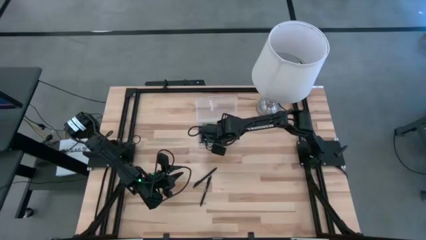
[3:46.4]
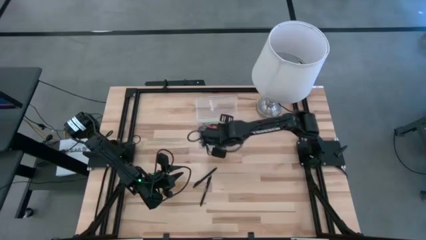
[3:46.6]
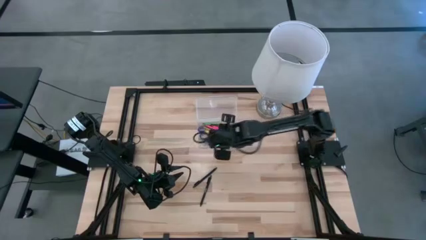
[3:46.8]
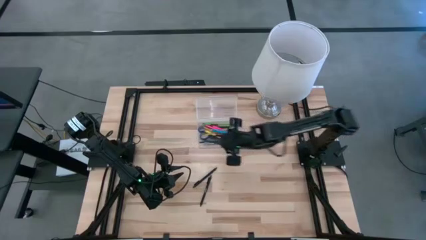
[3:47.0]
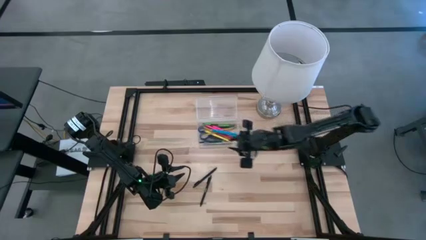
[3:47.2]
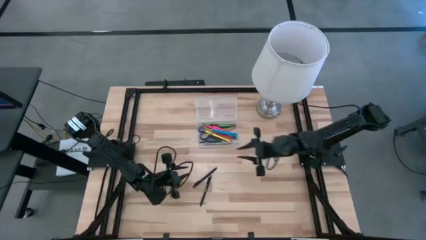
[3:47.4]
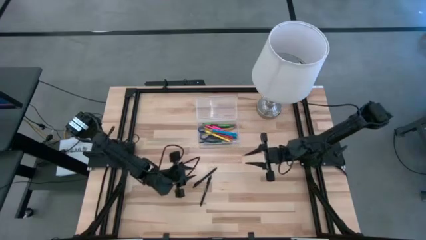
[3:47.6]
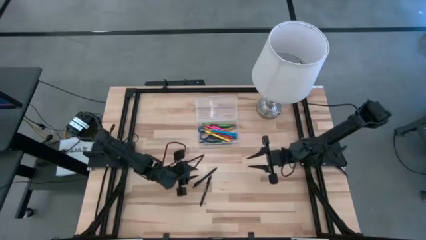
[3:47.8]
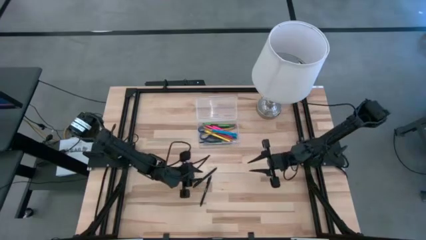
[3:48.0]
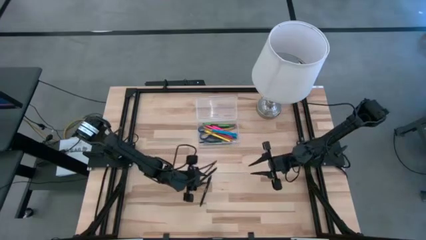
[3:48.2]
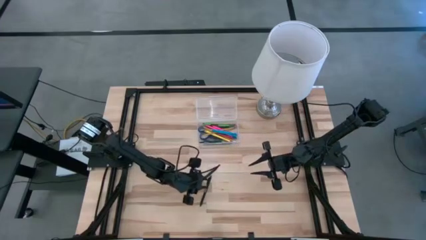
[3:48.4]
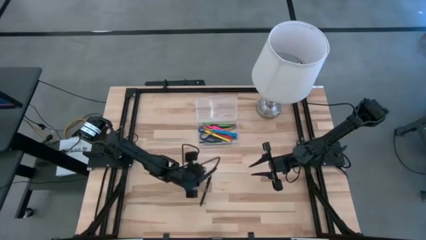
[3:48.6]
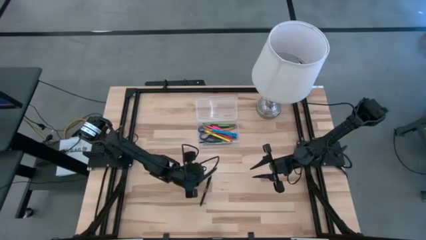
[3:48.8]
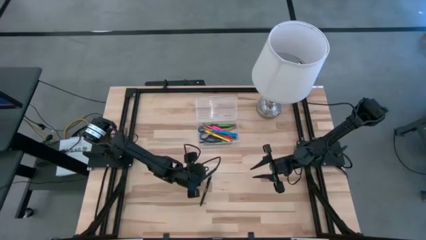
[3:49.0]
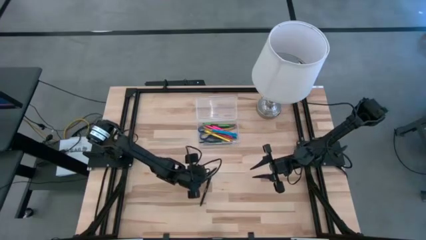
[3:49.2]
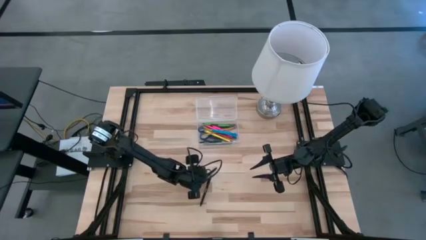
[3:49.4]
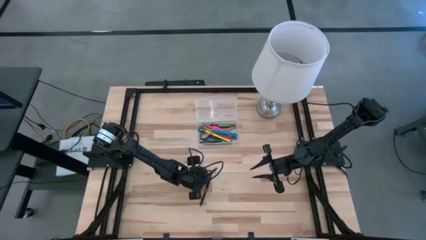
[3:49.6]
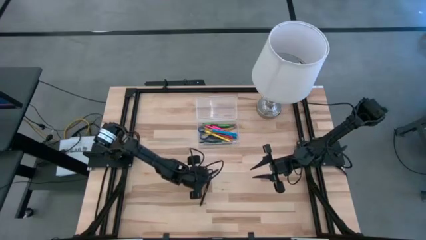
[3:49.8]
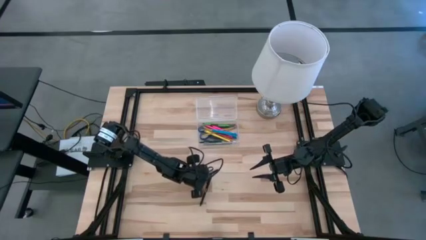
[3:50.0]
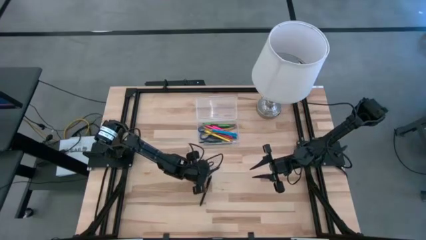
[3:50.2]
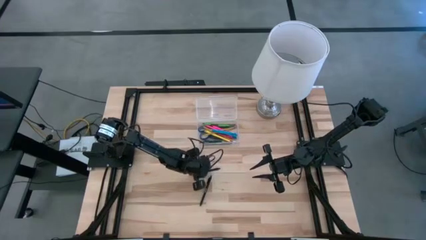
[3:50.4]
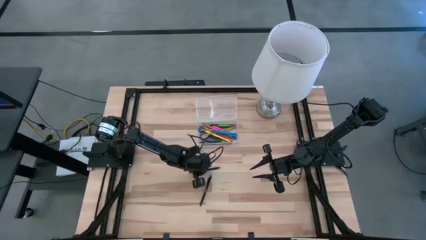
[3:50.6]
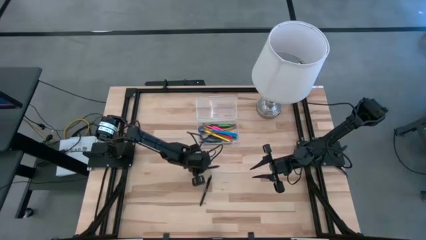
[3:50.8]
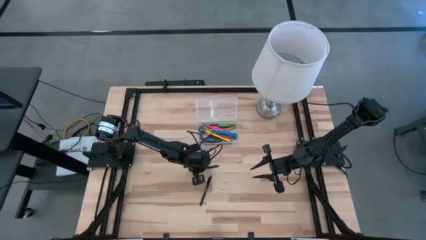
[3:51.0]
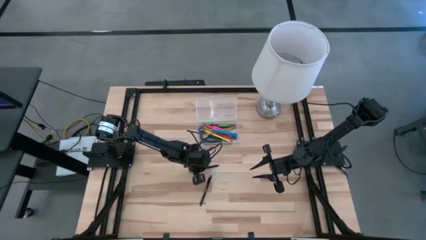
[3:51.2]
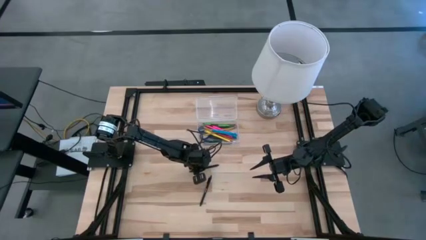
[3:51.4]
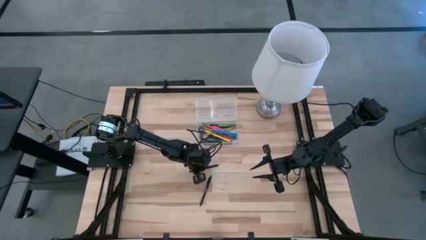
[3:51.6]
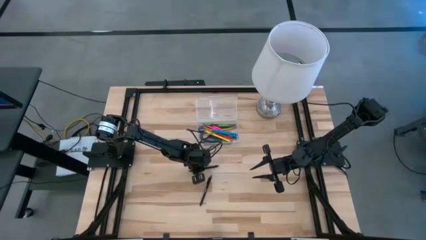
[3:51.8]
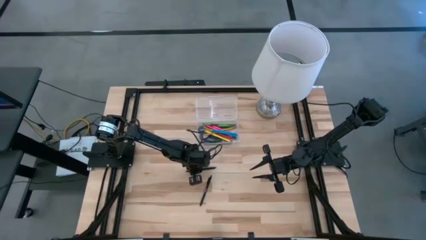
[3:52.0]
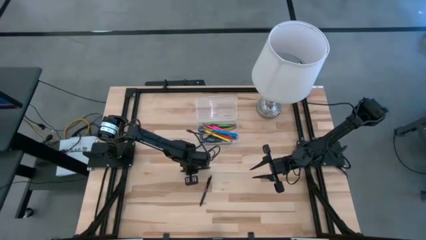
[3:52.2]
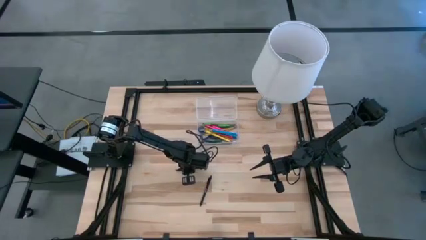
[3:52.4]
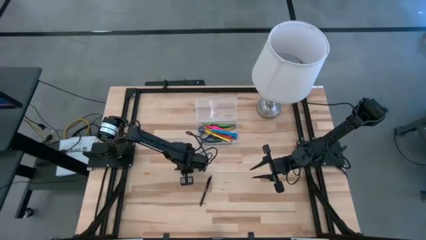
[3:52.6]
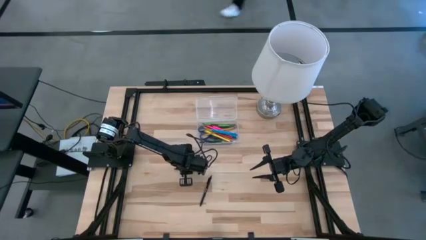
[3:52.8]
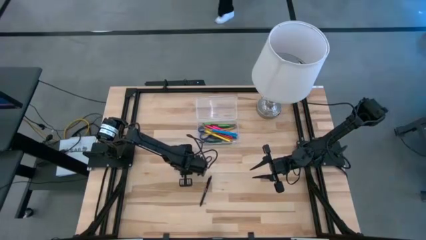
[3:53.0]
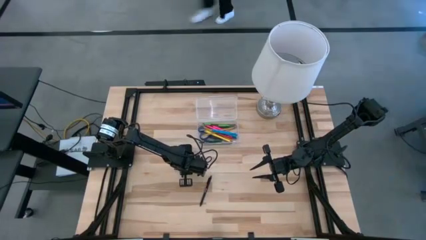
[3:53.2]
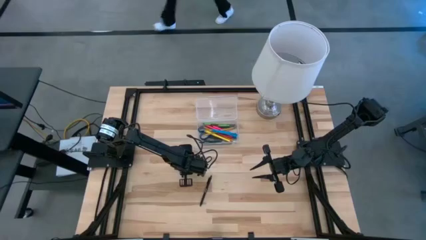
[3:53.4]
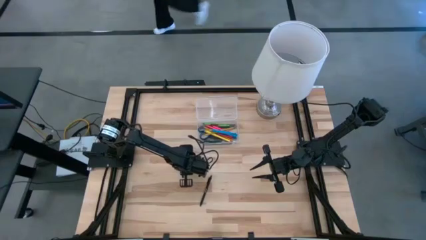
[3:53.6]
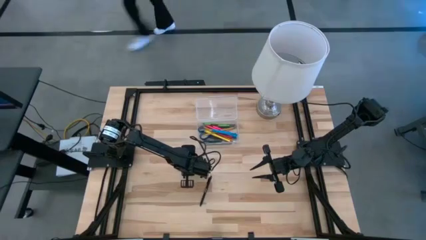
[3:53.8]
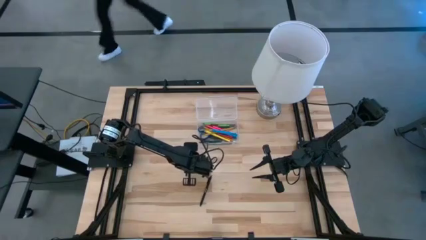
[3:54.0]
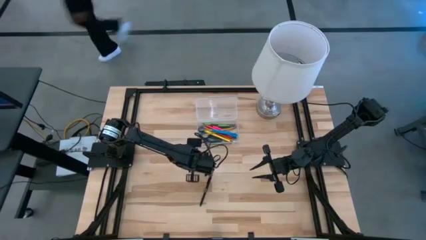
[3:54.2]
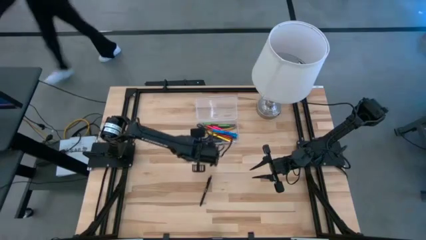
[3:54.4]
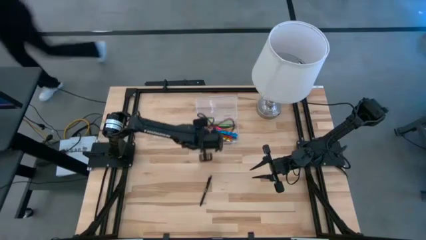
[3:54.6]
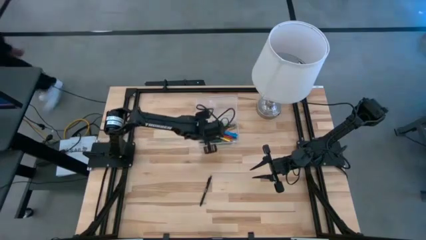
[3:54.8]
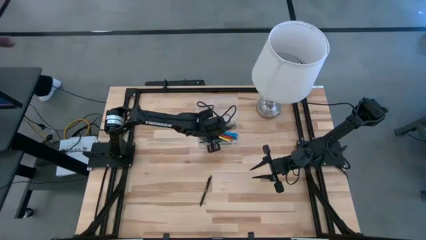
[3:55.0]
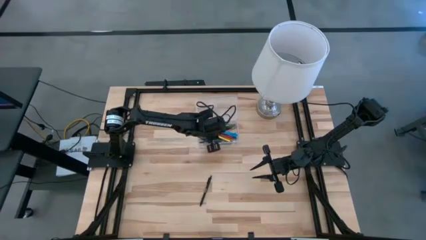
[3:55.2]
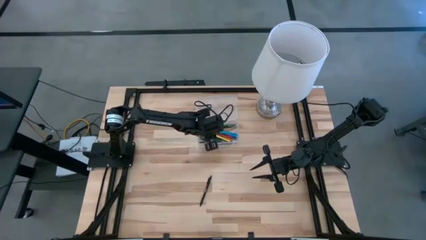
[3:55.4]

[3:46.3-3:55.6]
Task: Pick & place school supplies into a supply box
Put the top black pen into the supply box

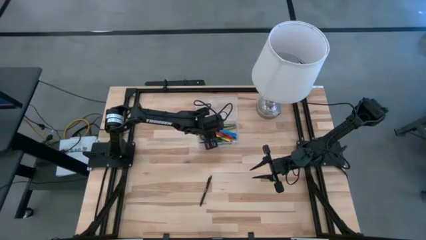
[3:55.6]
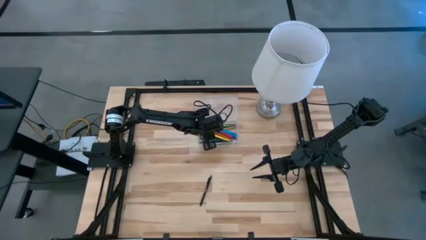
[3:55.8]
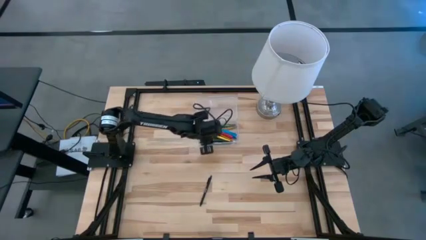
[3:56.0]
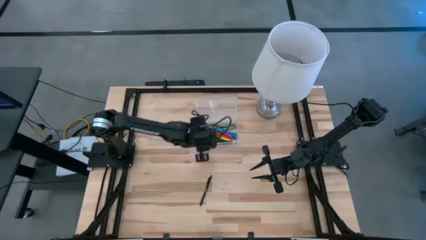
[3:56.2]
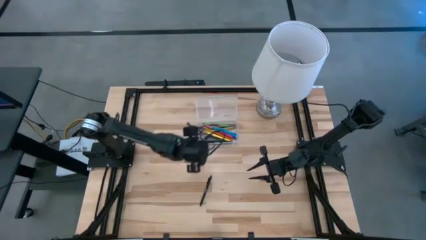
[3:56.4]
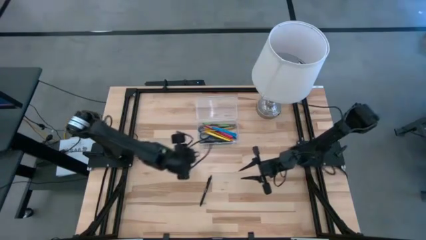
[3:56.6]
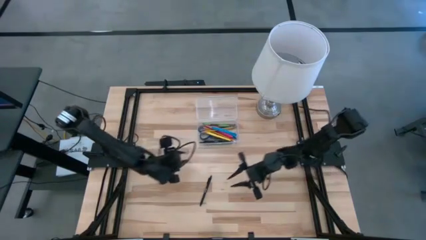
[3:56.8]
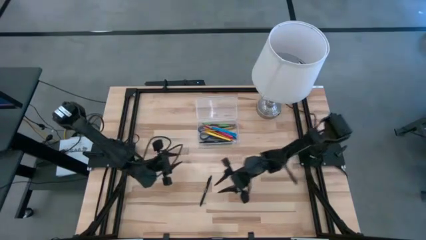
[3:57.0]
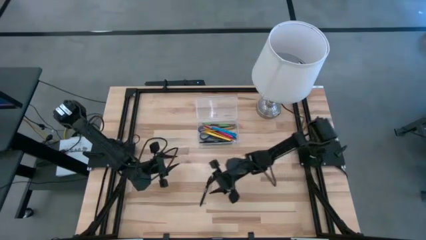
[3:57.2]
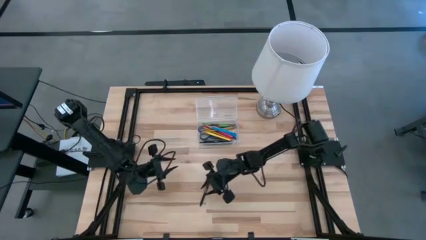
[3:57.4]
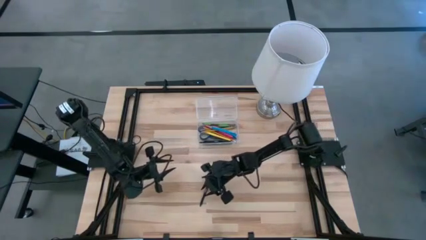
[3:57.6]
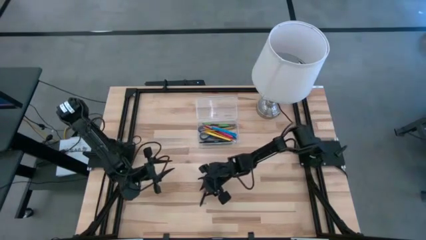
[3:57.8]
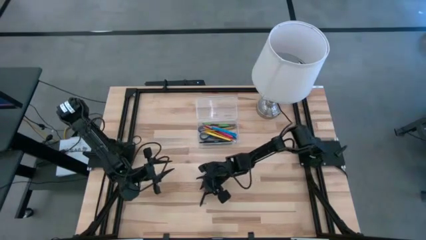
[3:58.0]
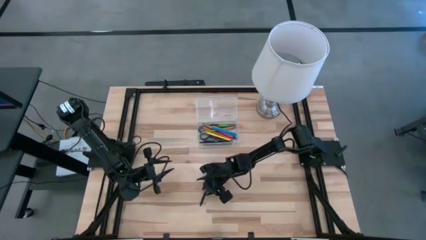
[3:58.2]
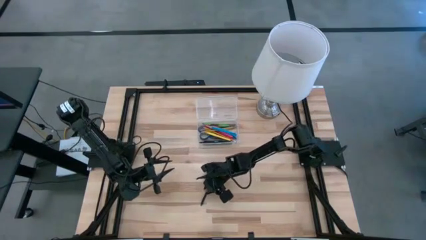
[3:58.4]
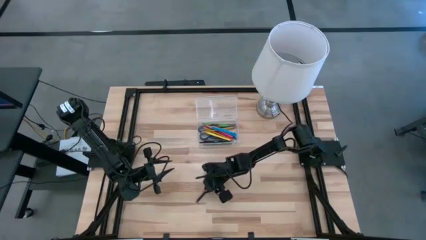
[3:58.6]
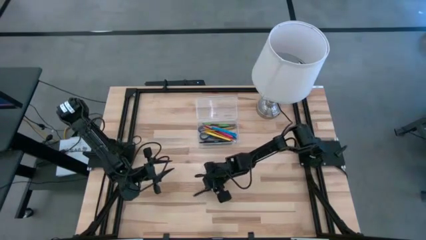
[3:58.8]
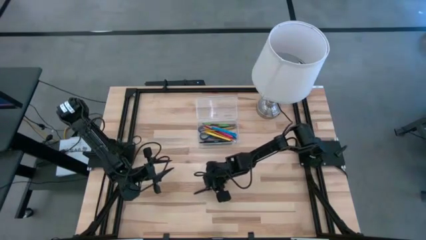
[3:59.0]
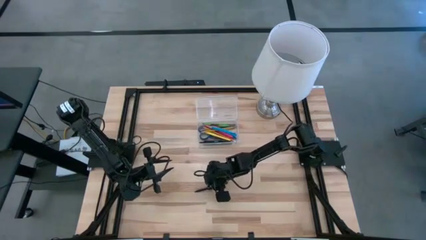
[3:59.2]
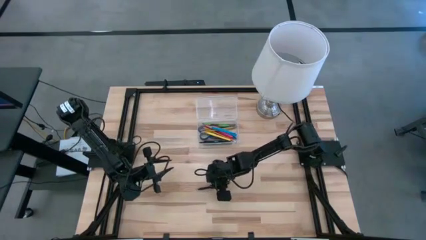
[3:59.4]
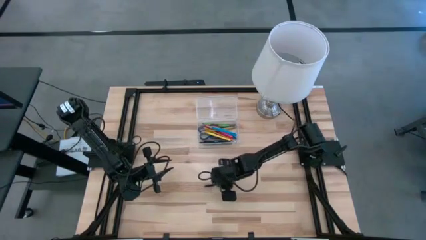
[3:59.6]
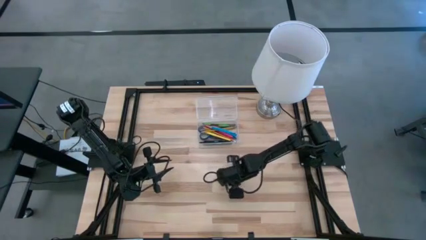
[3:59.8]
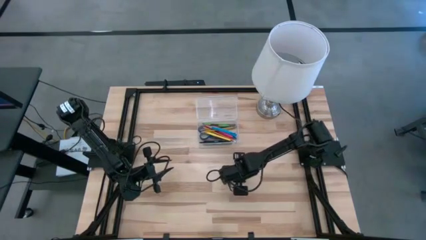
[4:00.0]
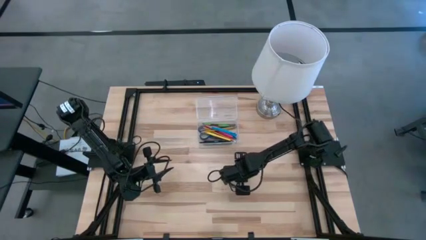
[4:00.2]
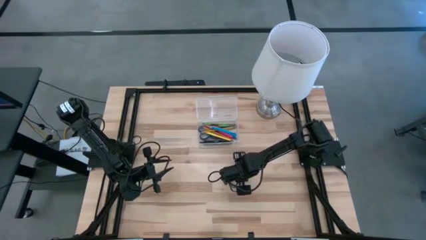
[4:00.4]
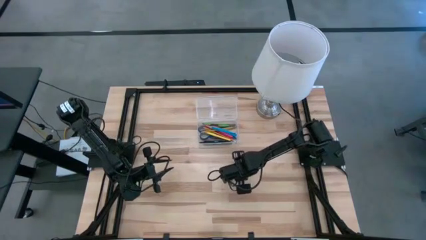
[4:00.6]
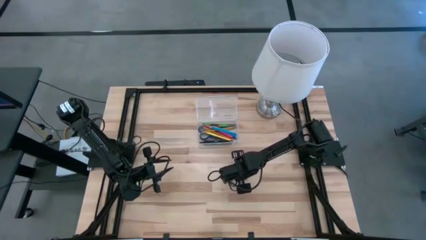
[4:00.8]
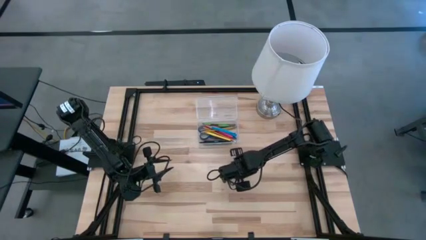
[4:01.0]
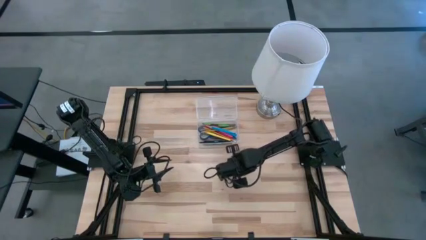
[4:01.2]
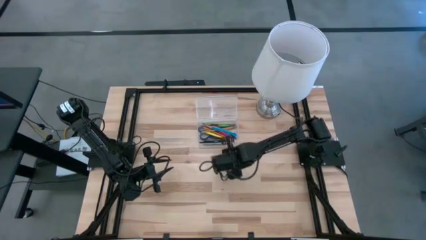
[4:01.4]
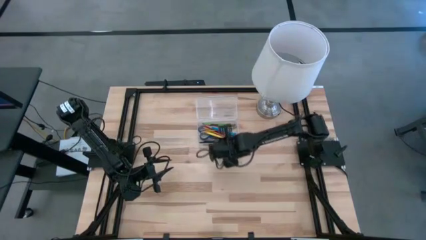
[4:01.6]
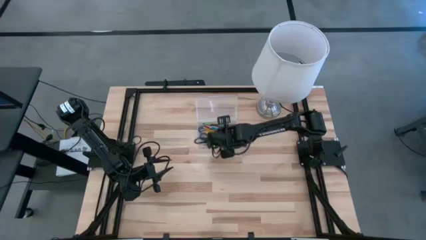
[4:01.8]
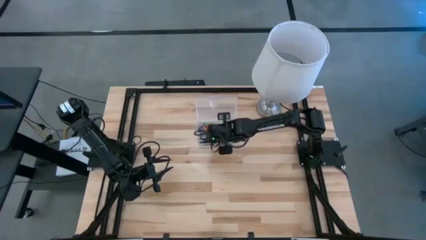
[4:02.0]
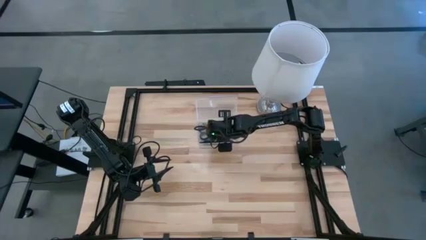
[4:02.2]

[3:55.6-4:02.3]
Put the black pen into the supply box

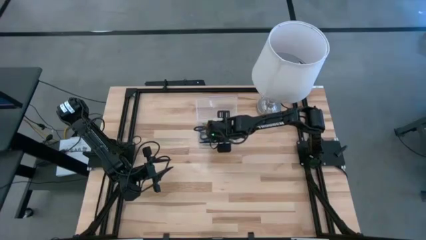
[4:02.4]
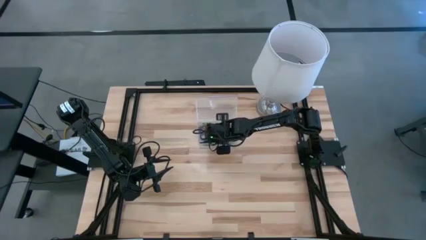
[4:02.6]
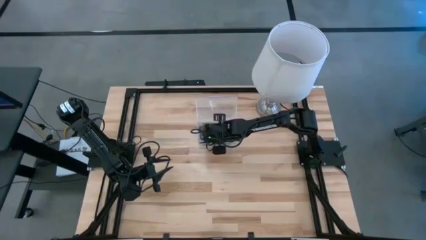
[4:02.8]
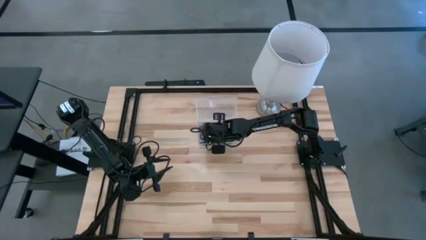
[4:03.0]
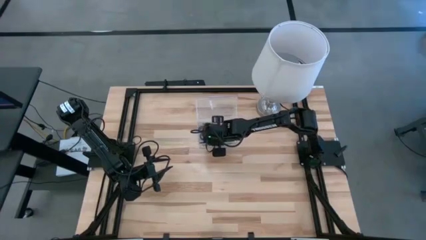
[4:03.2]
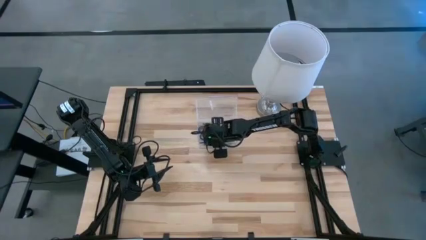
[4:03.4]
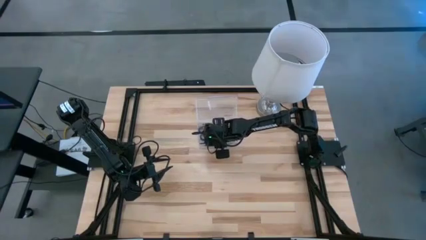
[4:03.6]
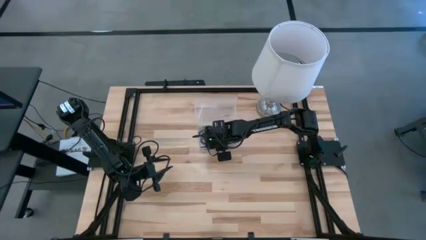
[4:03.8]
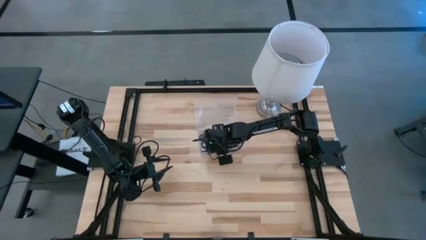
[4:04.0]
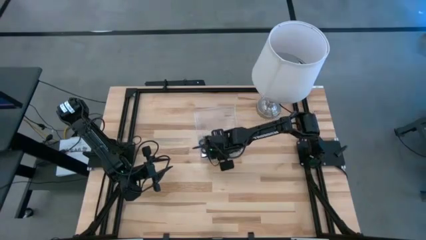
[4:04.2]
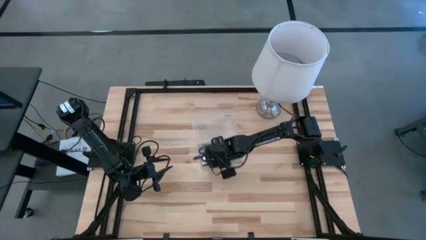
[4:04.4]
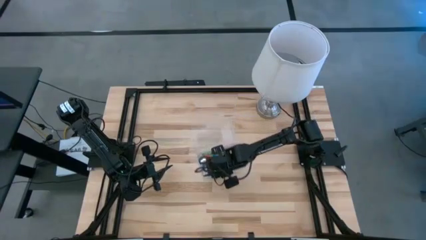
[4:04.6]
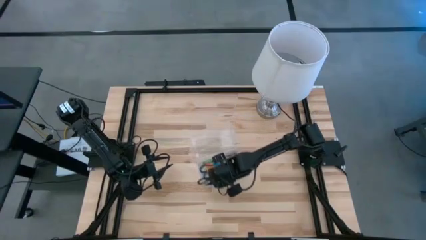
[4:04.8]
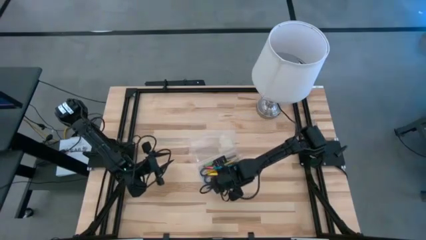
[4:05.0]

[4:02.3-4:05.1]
Move the supply box to the center of the table
